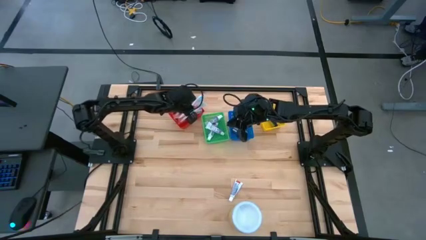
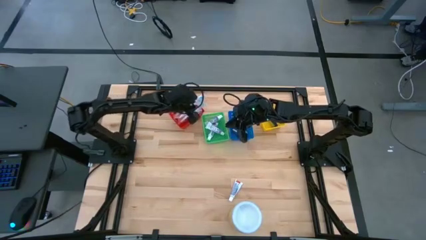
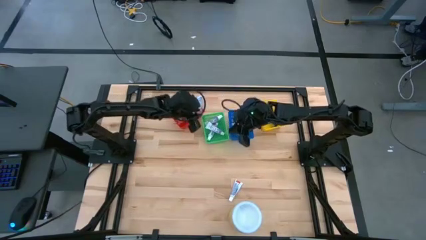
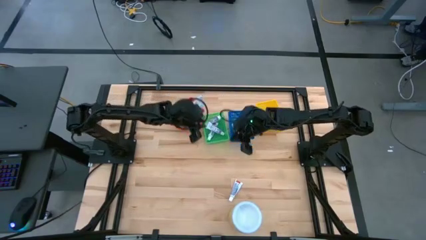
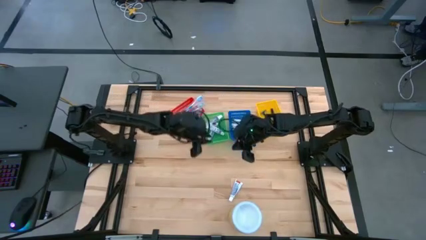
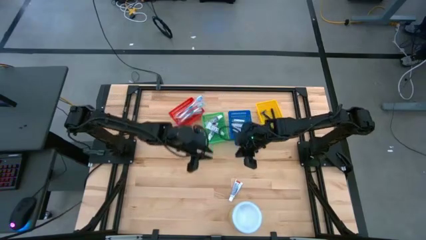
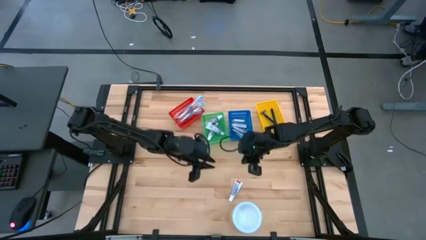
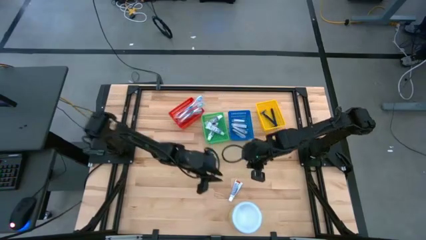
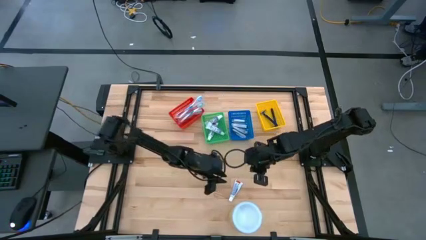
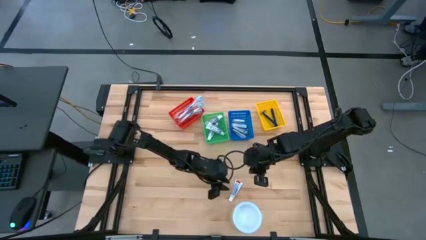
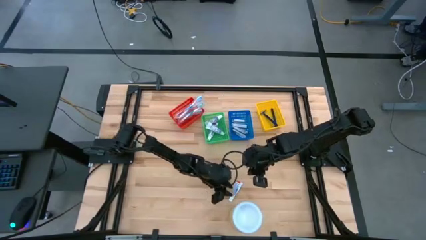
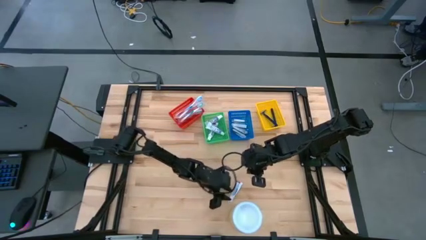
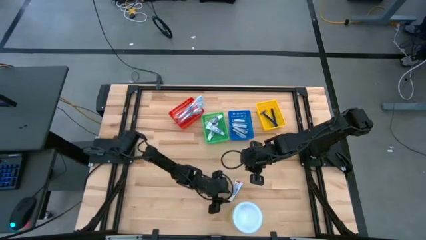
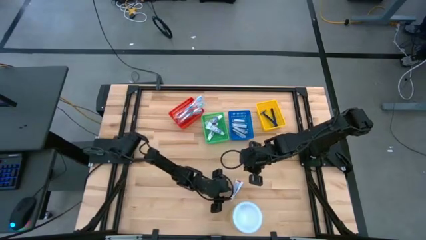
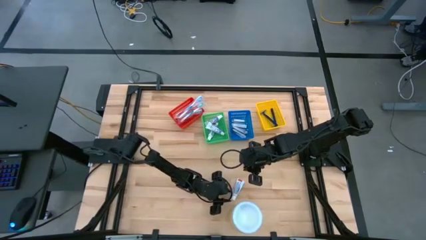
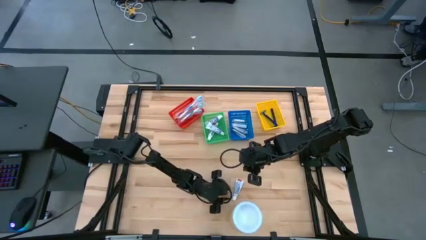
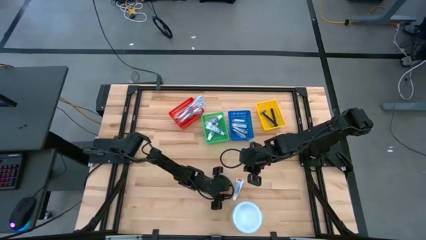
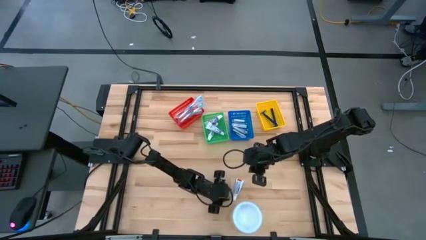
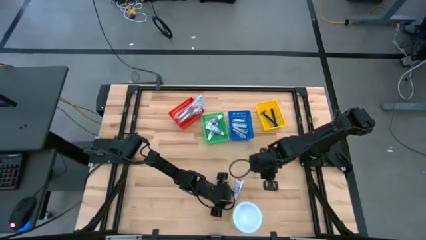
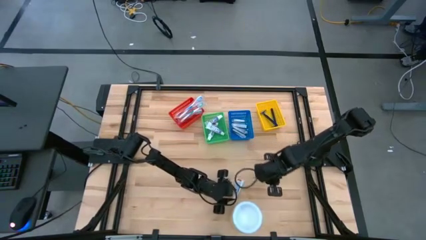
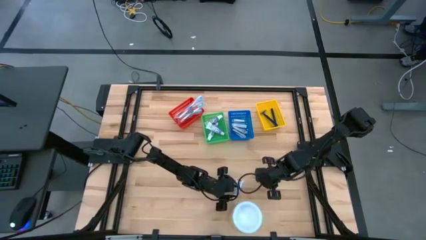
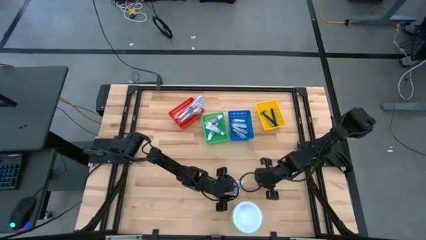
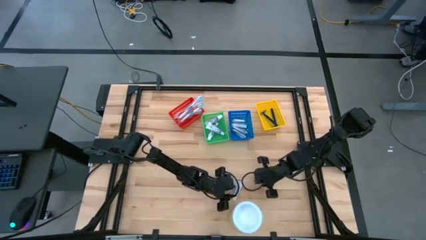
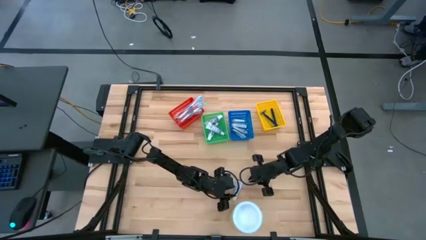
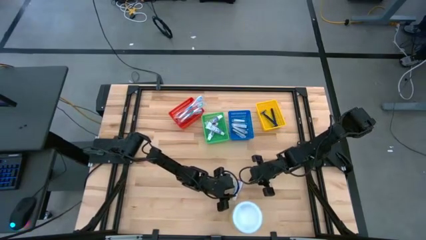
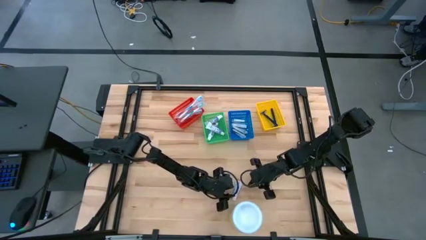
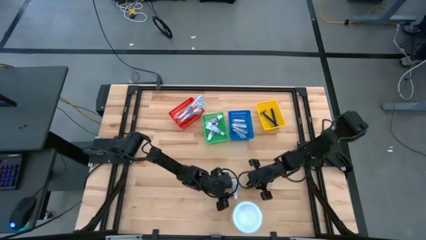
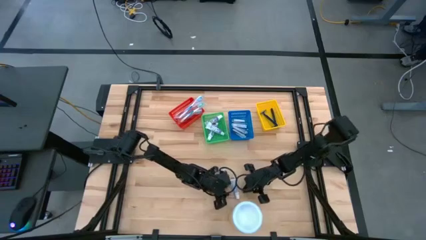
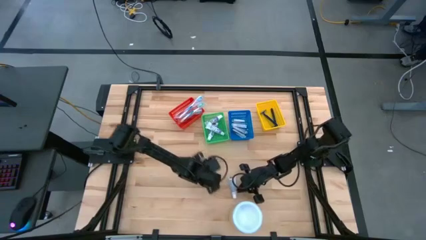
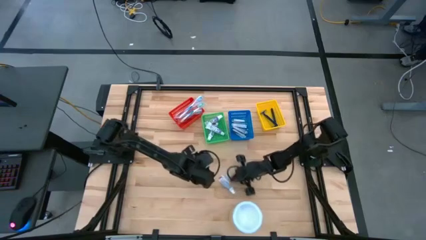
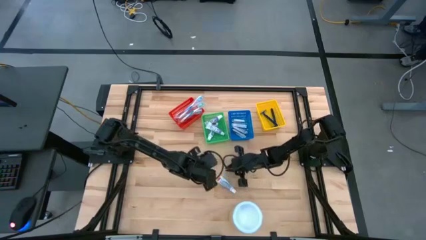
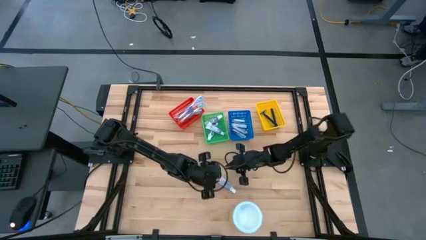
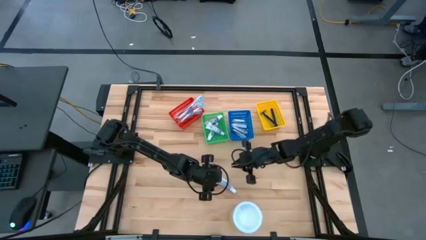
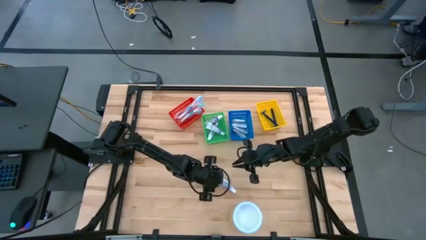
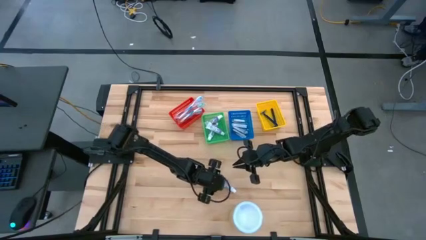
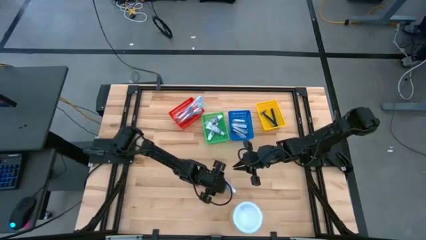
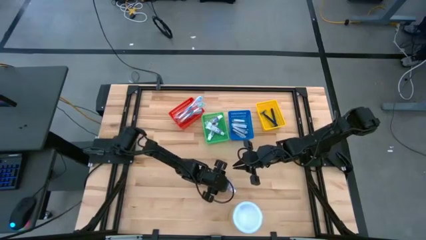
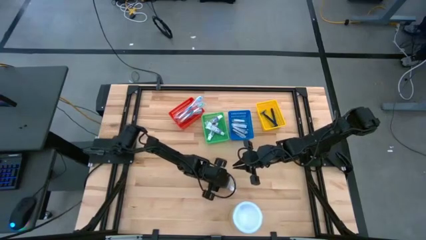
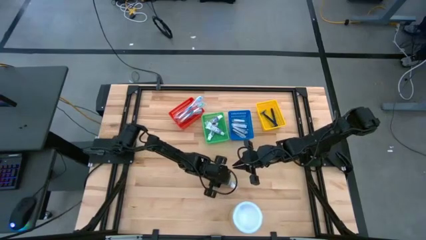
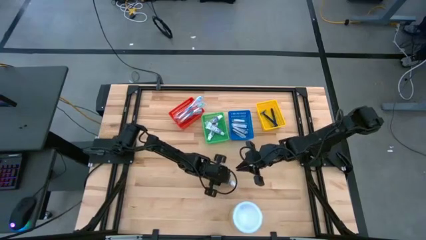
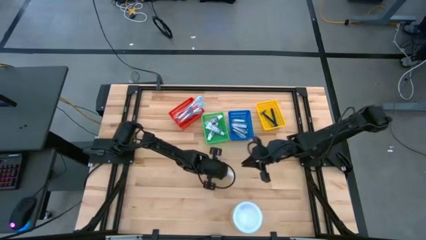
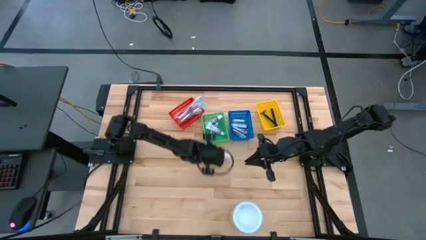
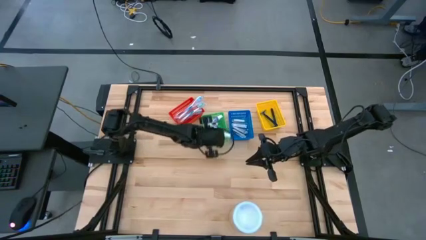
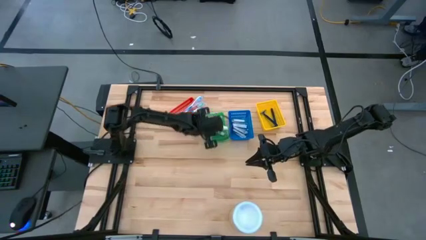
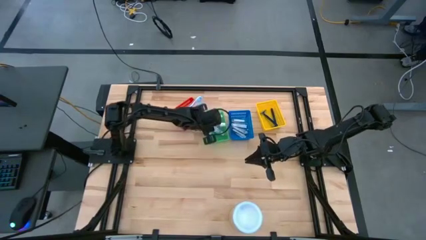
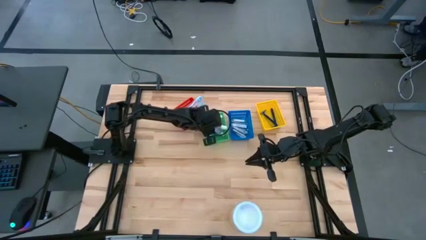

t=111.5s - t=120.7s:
Task: Pick & Place Travel size toiletries
Put the white toothpaste into the green bin

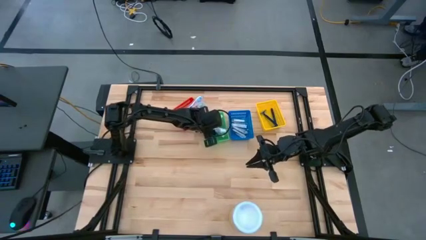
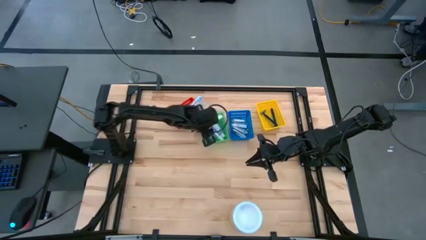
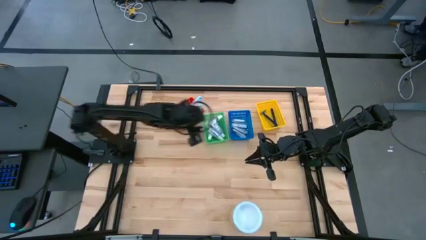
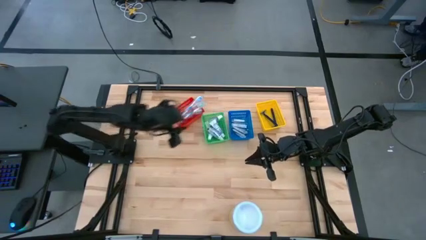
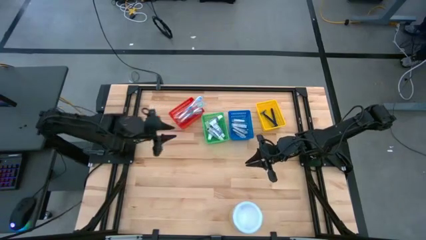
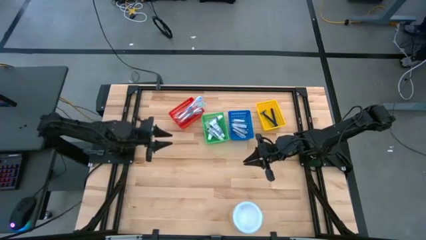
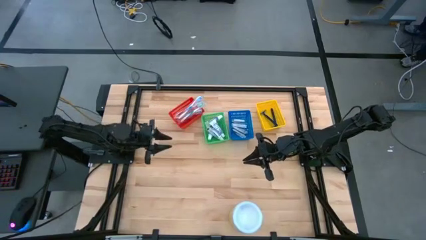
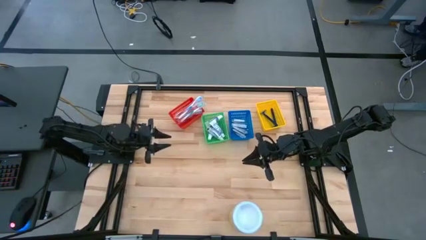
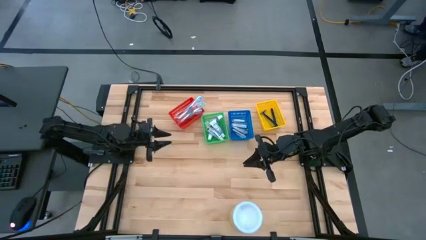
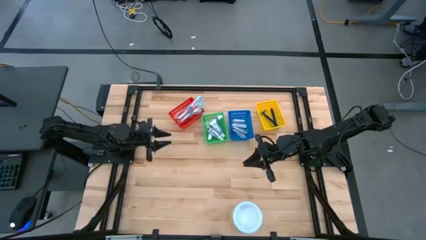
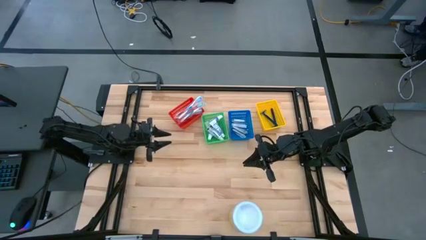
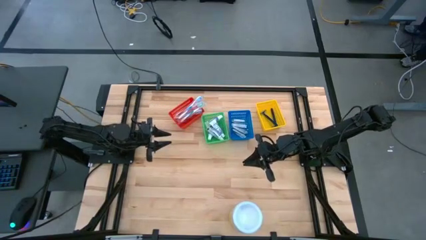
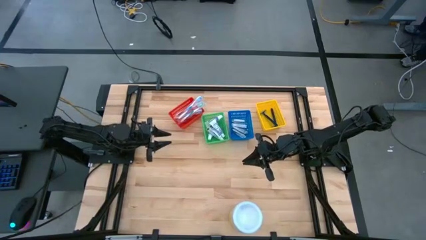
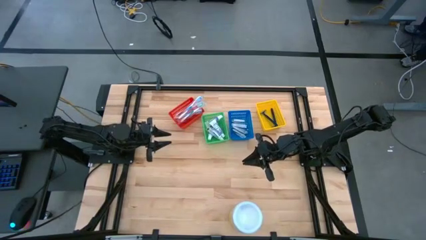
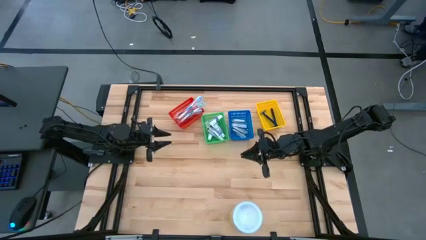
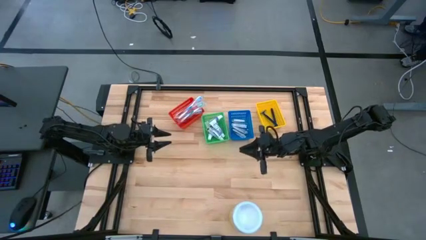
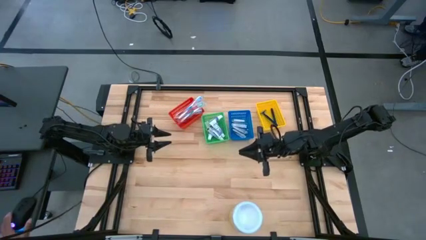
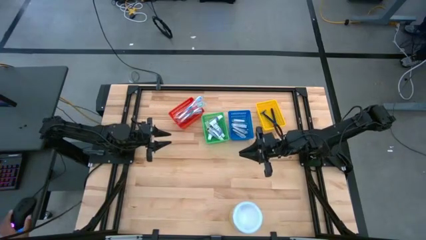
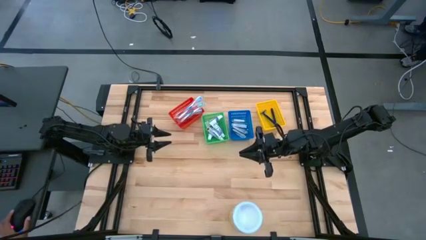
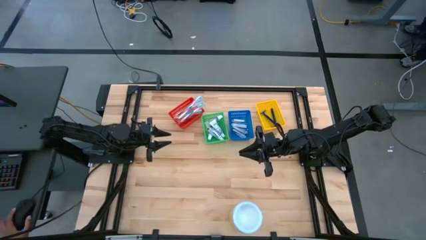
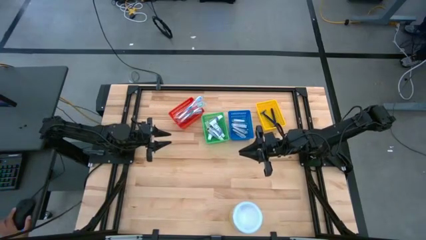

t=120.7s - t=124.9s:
Return to Home Position

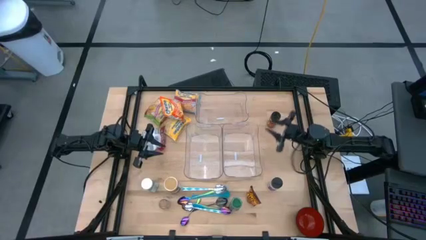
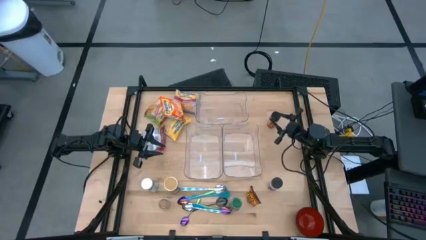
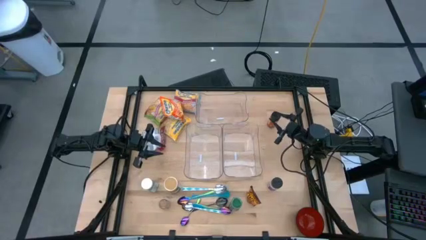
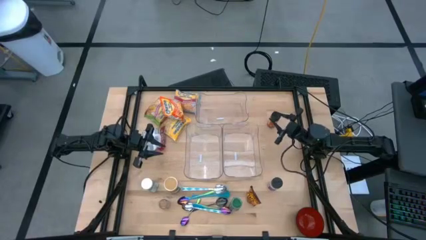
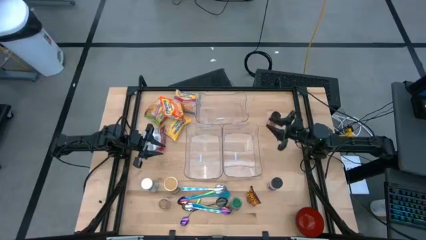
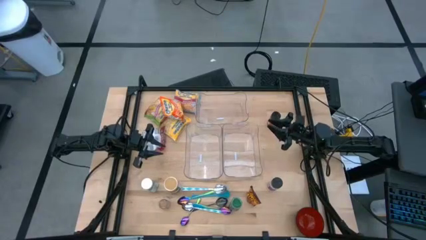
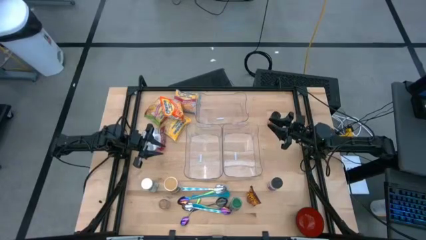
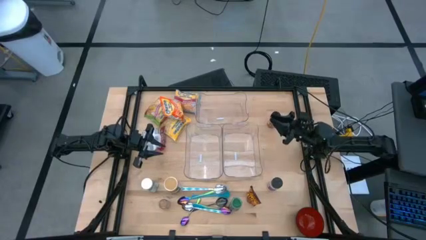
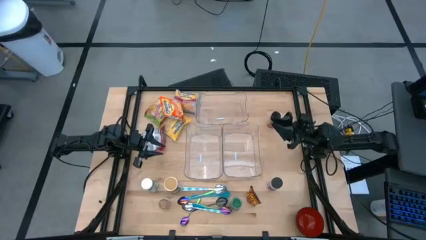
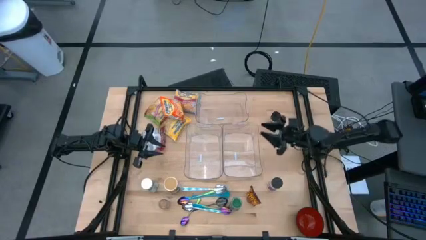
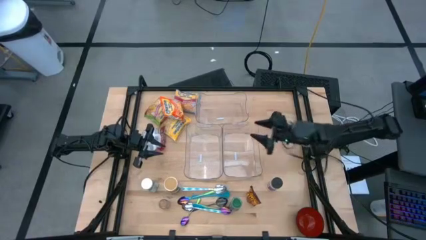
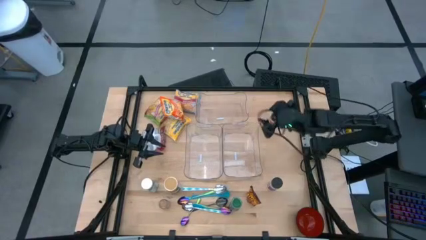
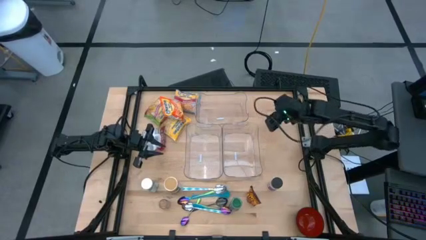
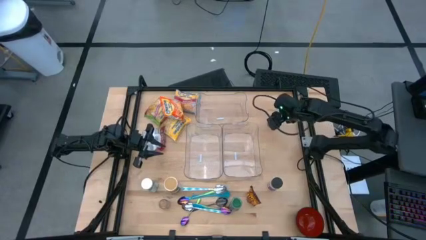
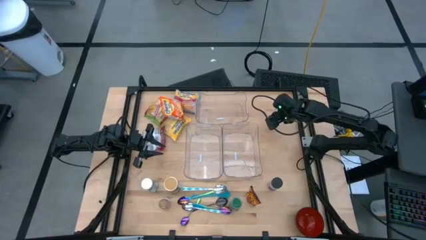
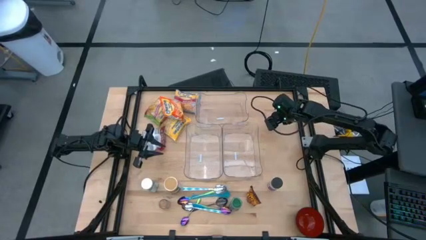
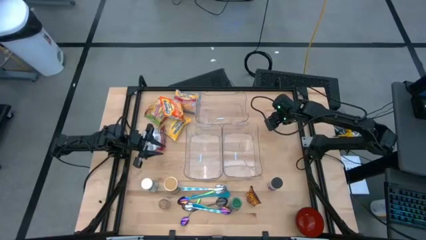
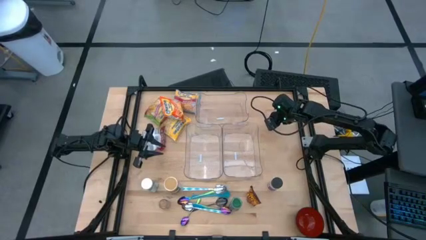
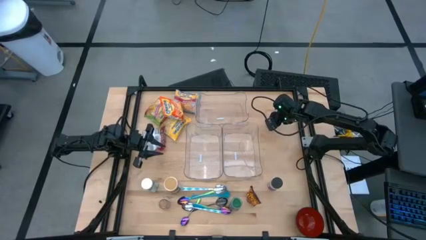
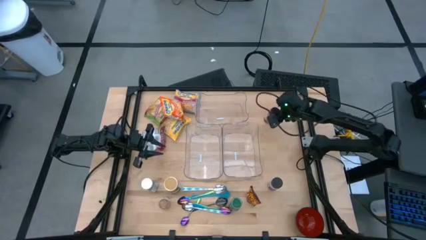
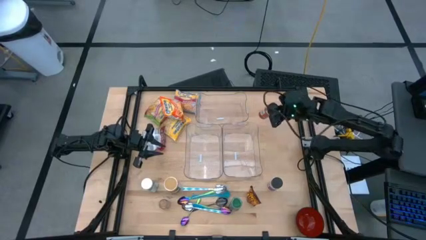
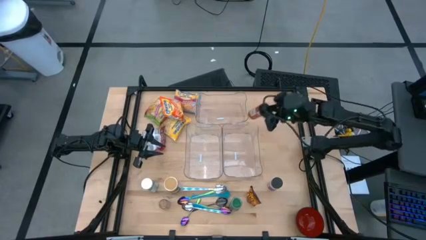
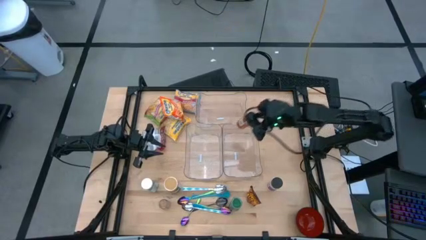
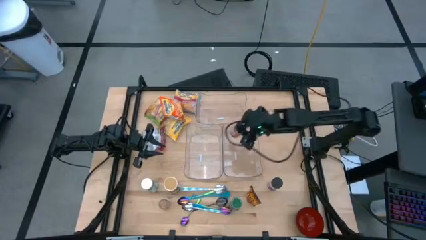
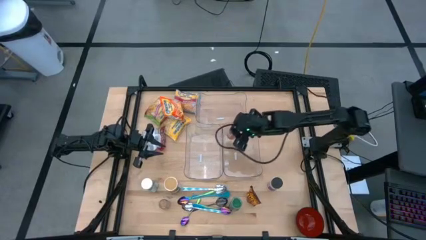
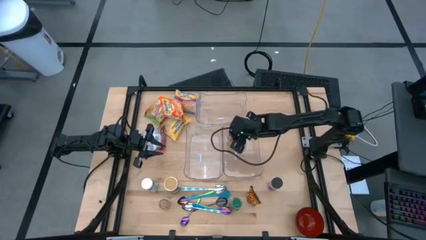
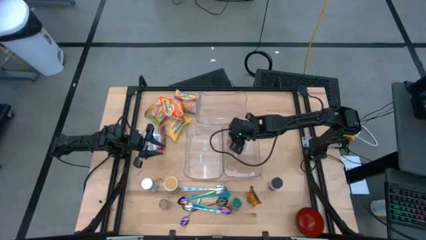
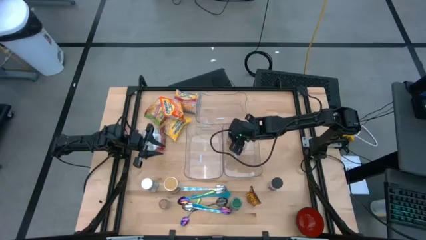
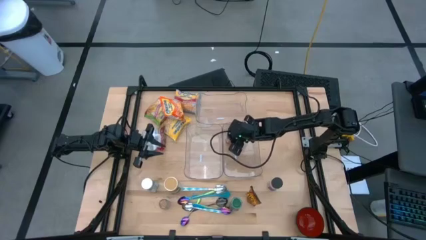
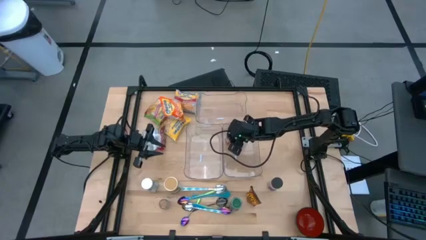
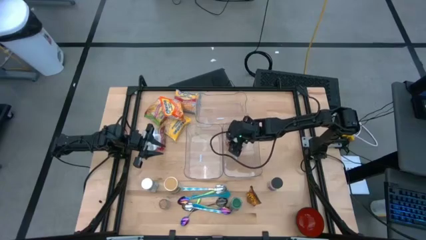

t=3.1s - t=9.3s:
Task: Pick & Place Food Item
Put the orange seasoning bottle into the bottom right transparent bin
